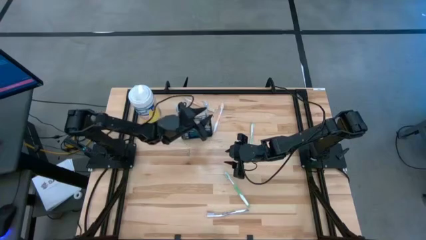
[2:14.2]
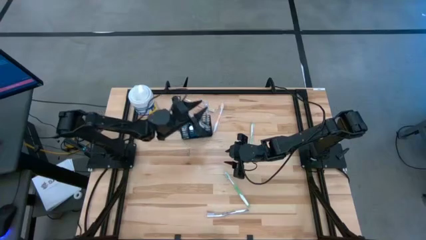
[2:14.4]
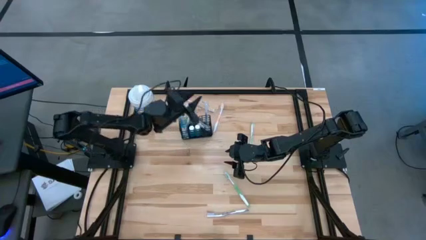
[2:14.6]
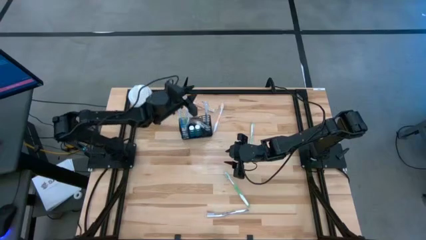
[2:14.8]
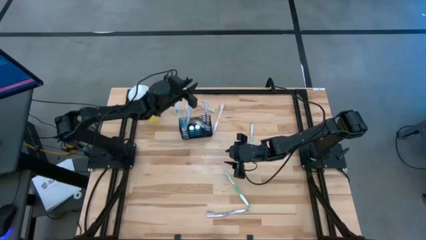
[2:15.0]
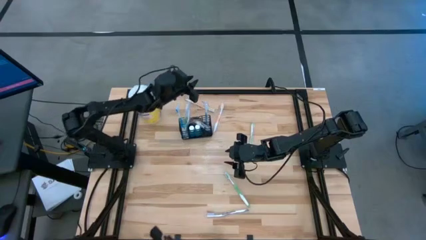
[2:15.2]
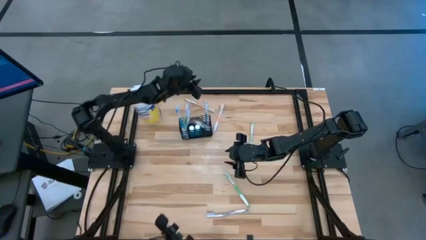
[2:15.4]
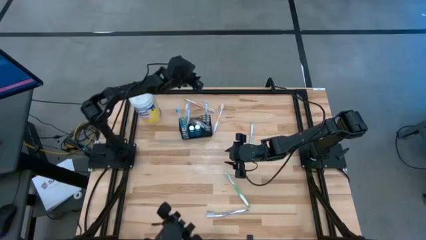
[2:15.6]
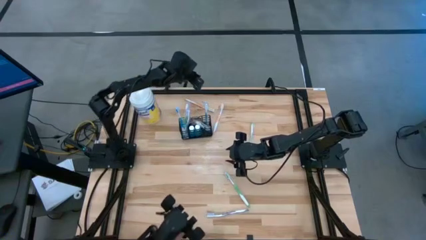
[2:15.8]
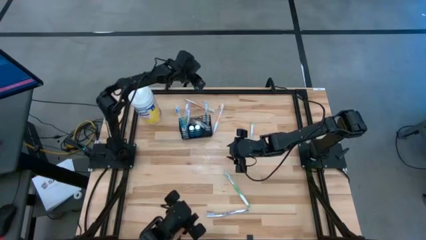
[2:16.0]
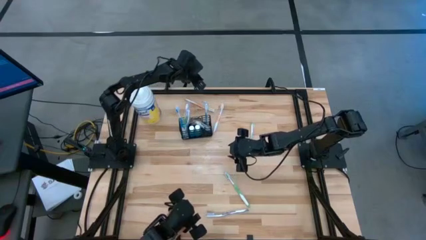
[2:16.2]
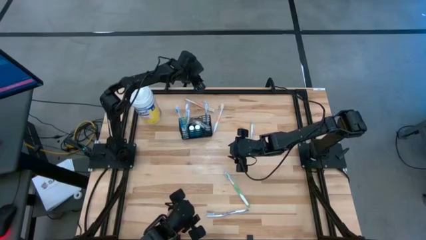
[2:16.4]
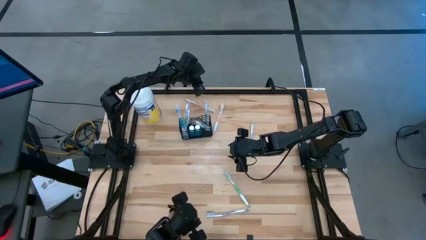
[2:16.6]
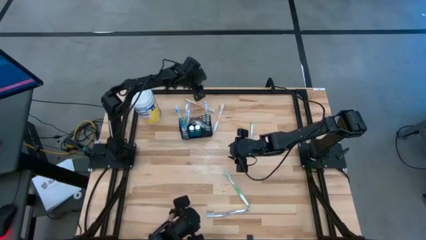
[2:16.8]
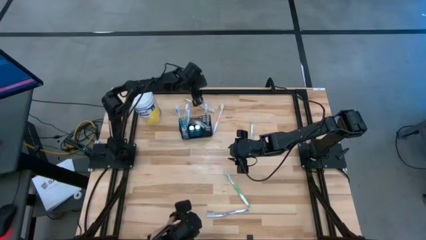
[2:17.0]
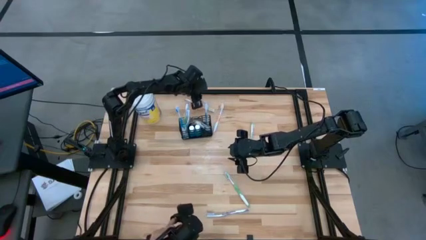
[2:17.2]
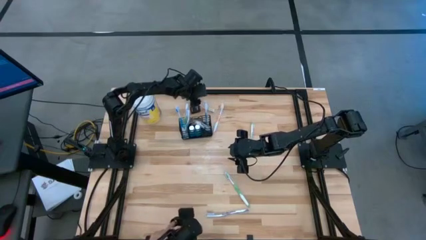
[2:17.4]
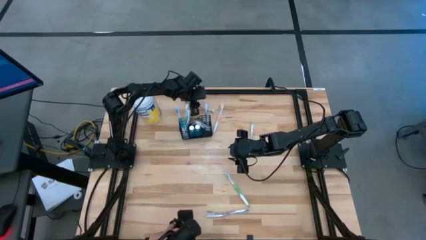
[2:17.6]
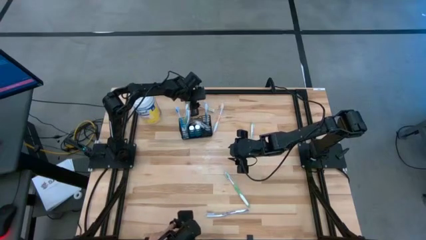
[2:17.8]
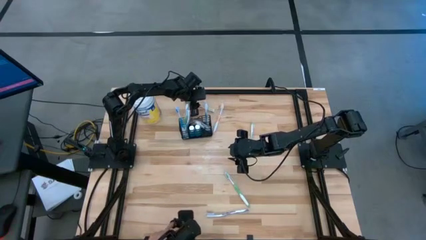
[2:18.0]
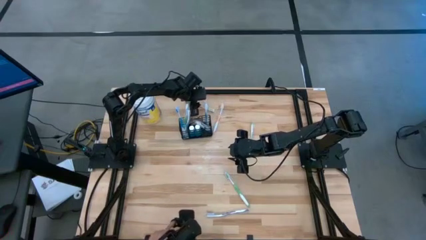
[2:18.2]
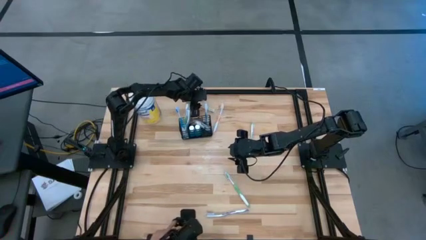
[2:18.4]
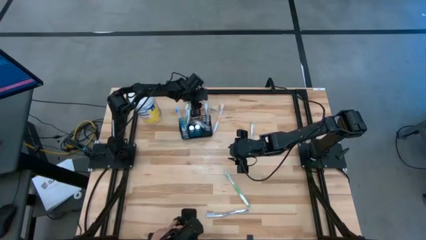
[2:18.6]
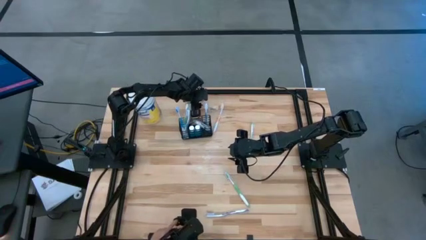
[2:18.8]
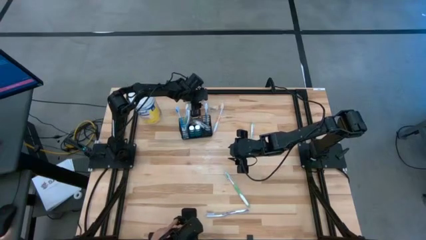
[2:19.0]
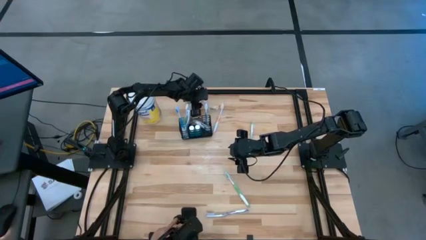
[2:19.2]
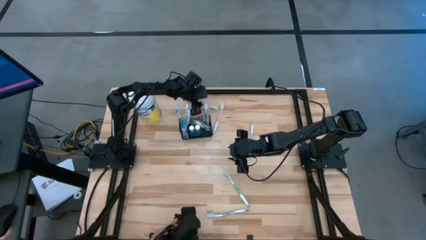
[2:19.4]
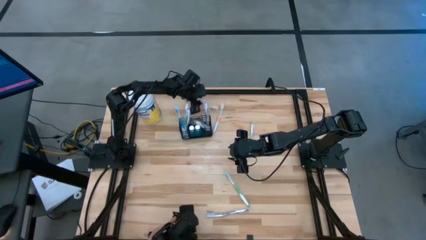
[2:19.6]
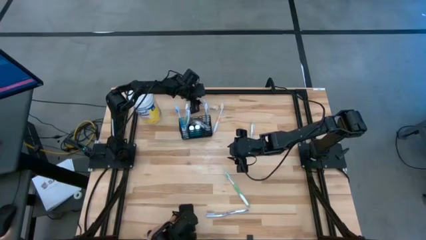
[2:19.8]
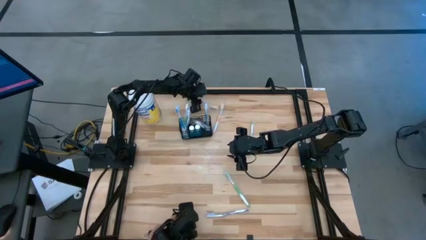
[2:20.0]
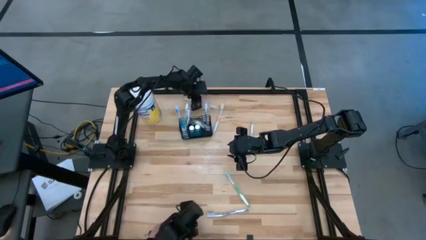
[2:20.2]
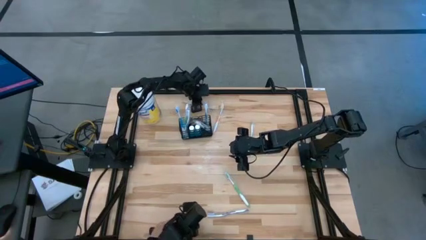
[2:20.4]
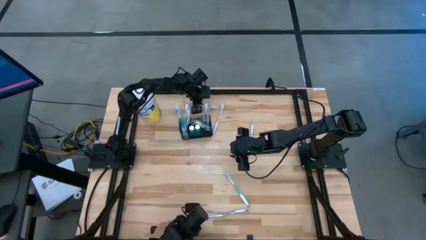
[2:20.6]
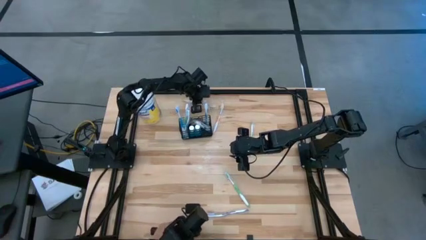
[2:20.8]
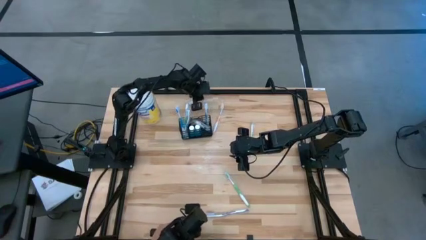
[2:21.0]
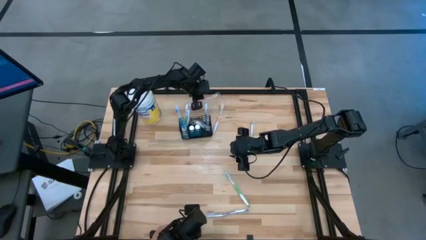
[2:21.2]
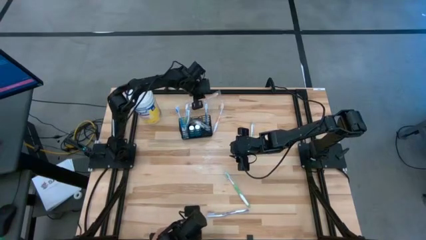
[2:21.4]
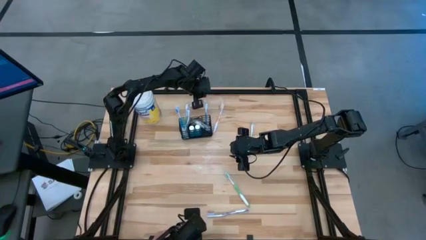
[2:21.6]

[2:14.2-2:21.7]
Task: Pick & Place toothbrushing station
Put the right orange toothbrush into the mesh organizer
